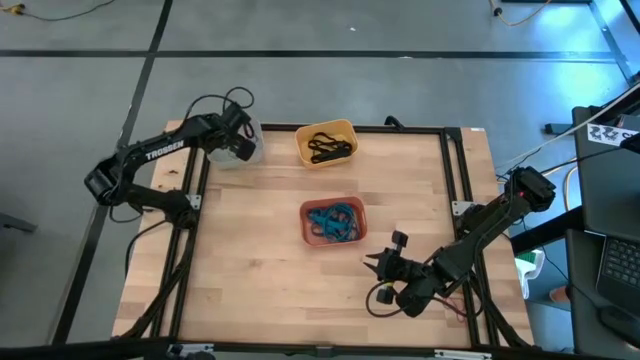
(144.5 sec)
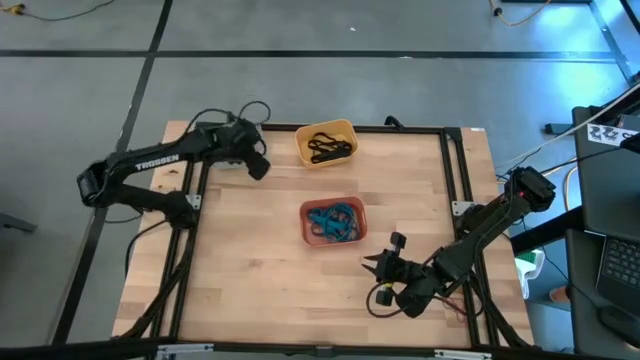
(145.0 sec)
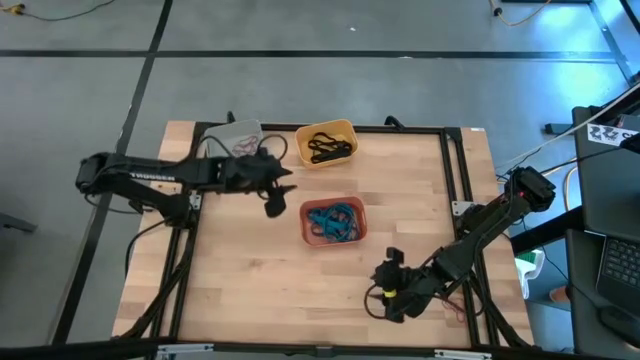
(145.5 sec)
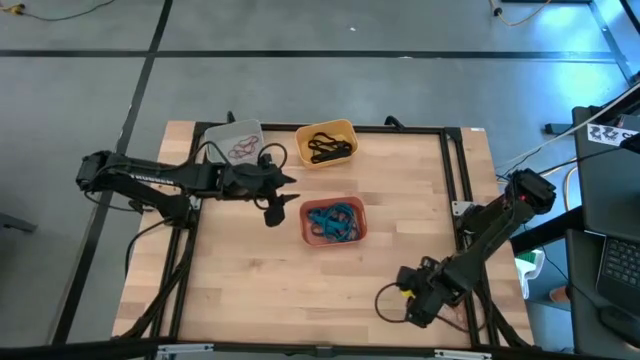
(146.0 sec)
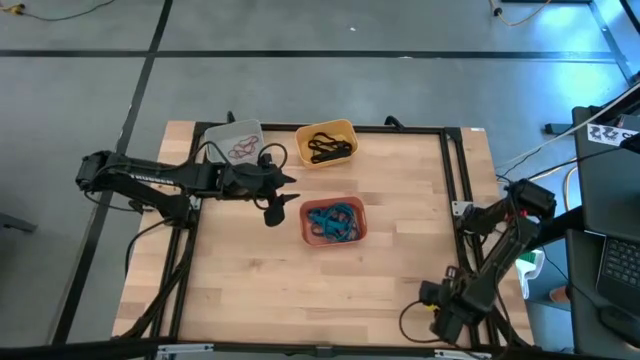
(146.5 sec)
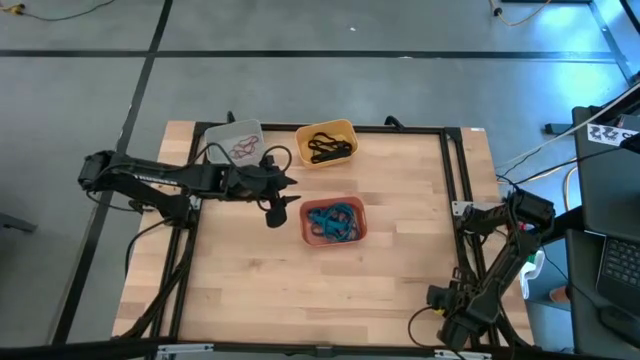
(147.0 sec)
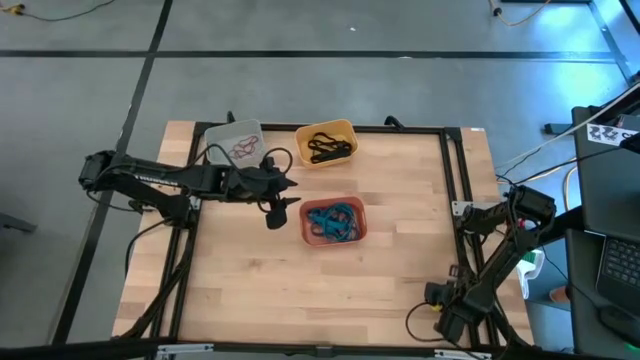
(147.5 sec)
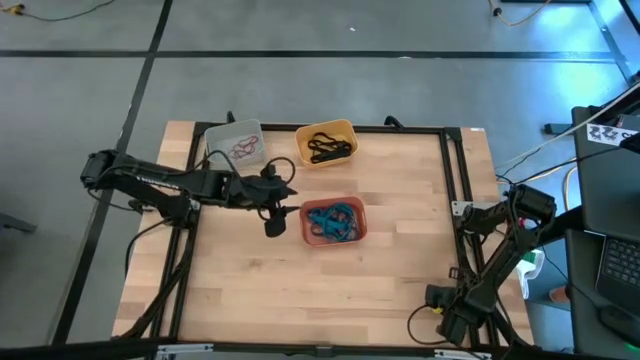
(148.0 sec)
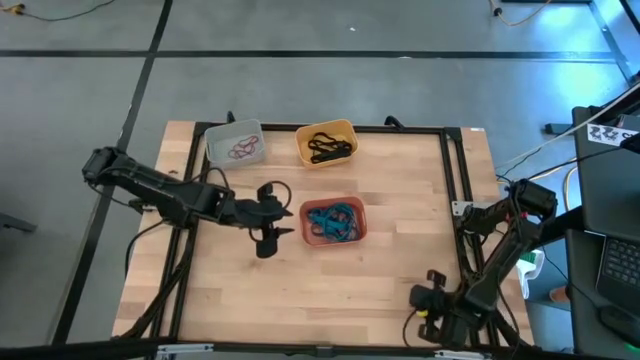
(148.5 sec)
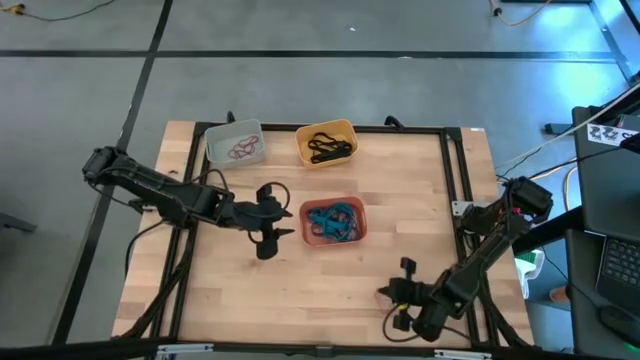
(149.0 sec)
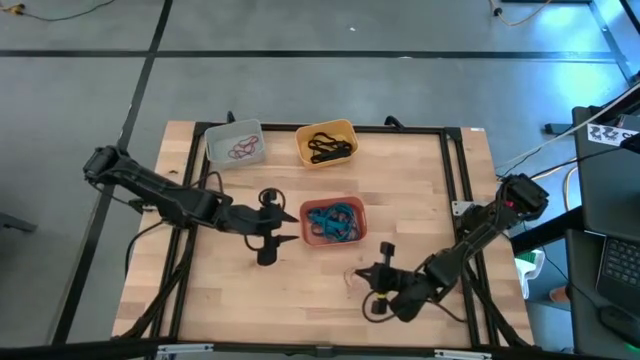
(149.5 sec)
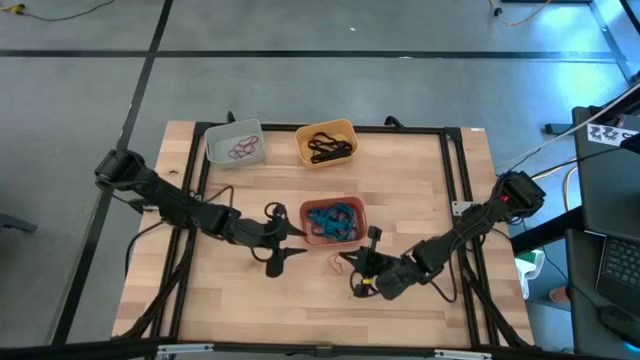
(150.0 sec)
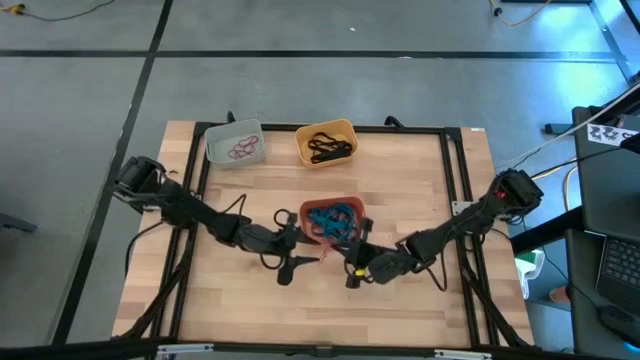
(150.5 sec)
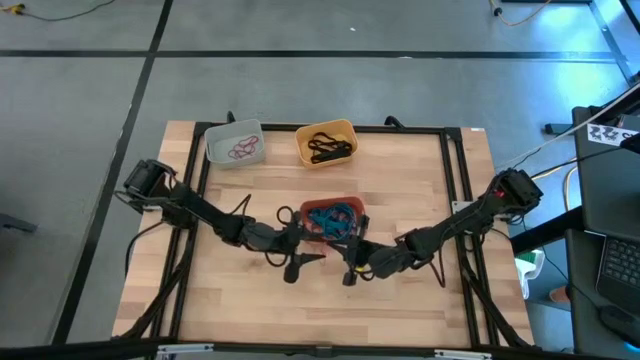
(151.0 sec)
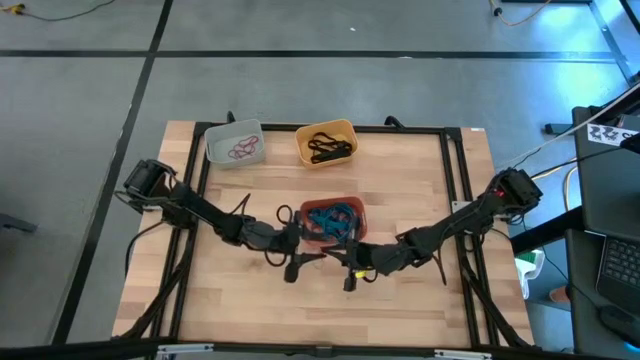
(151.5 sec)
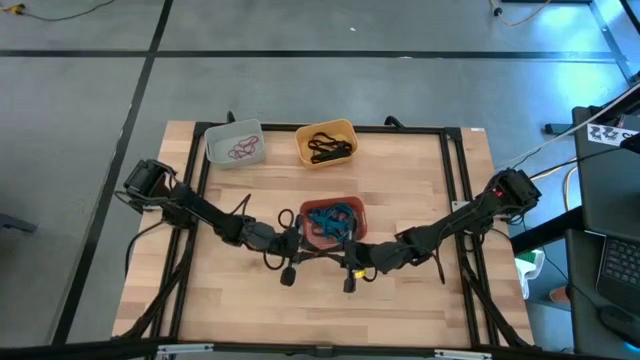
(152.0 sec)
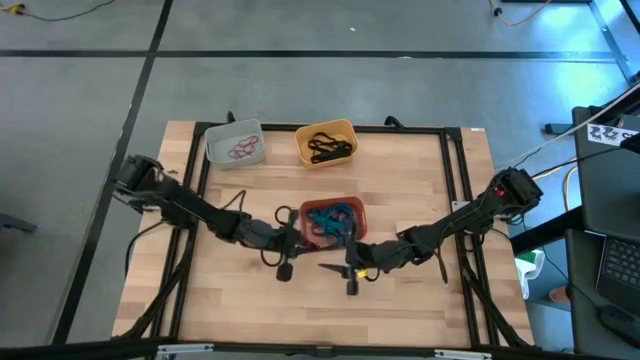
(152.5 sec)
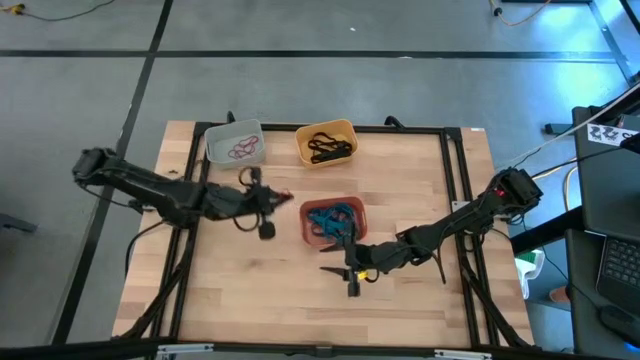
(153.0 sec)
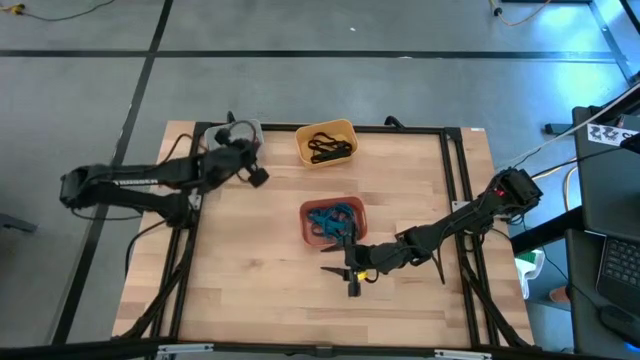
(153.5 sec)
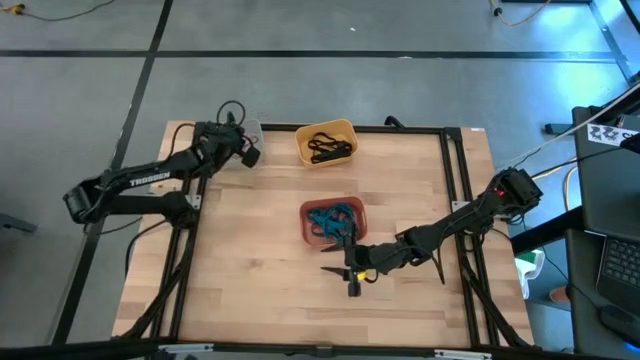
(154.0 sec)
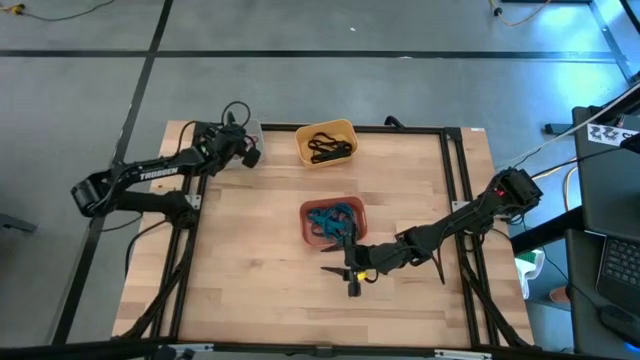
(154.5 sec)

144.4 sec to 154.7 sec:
Task: Sort rubber bands into baskets
Put the red rubber band into the gray bin

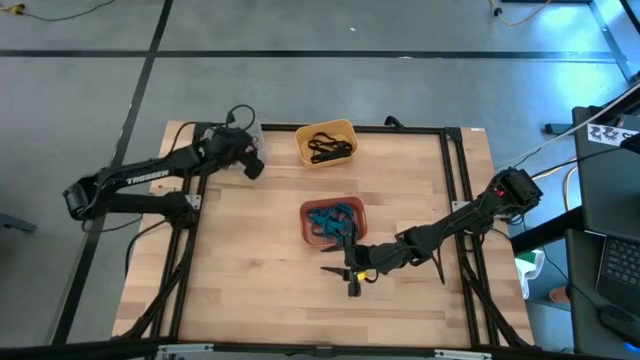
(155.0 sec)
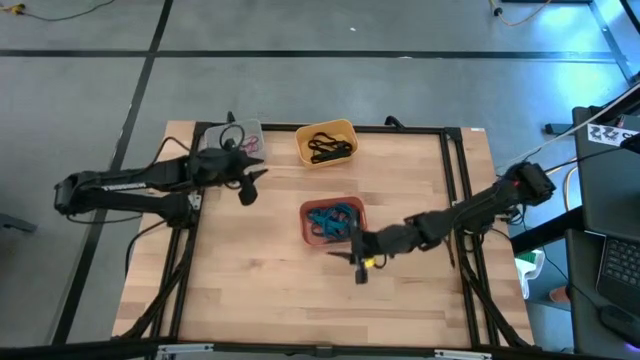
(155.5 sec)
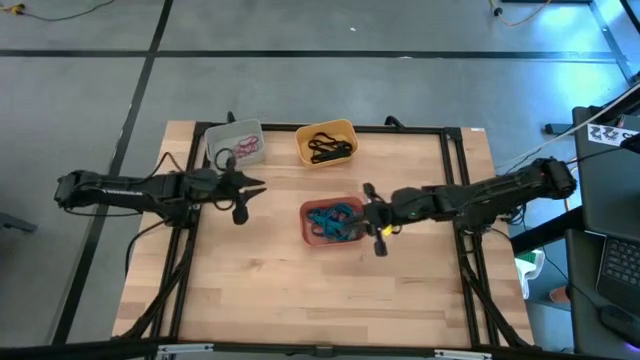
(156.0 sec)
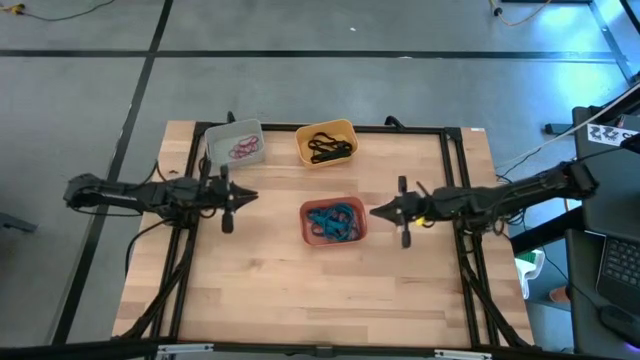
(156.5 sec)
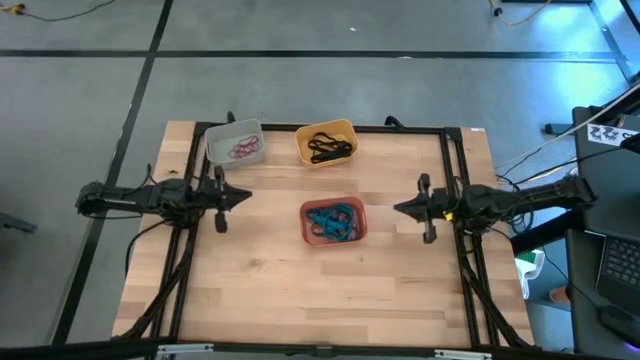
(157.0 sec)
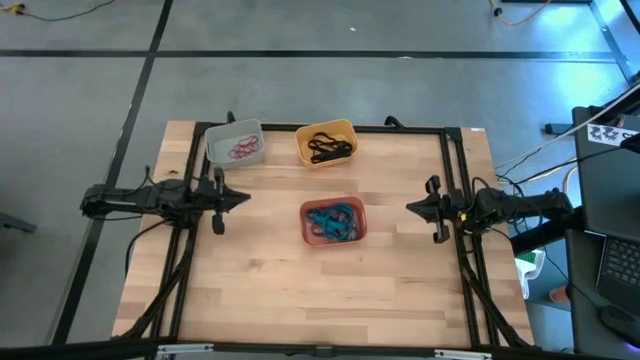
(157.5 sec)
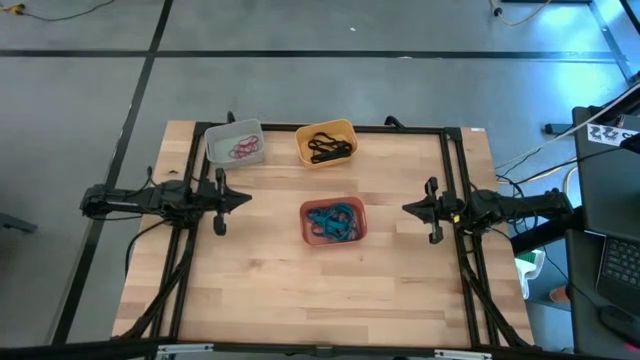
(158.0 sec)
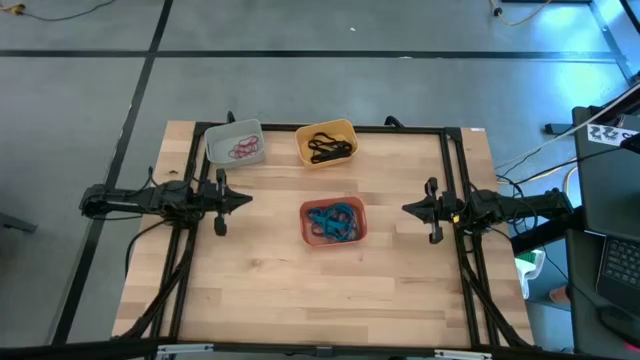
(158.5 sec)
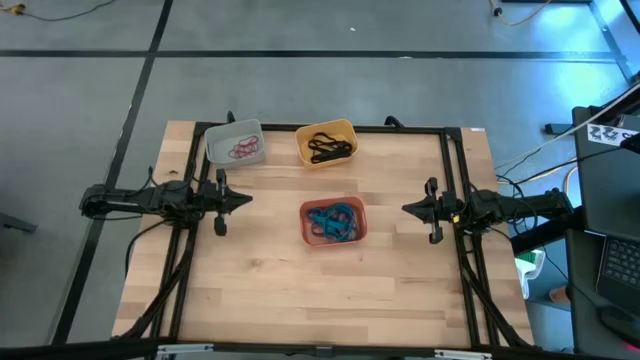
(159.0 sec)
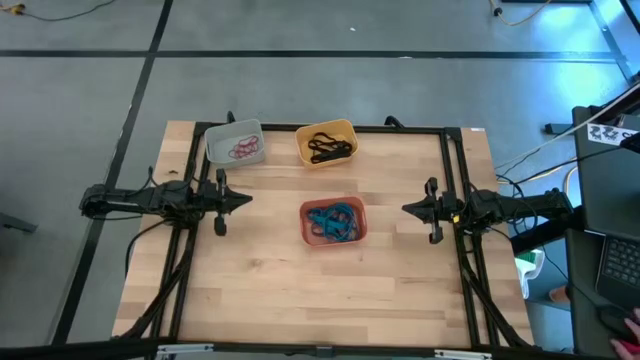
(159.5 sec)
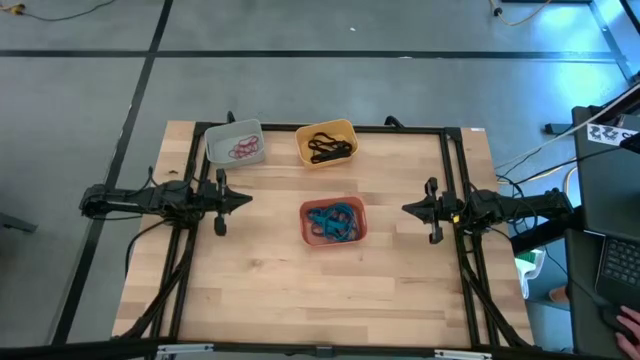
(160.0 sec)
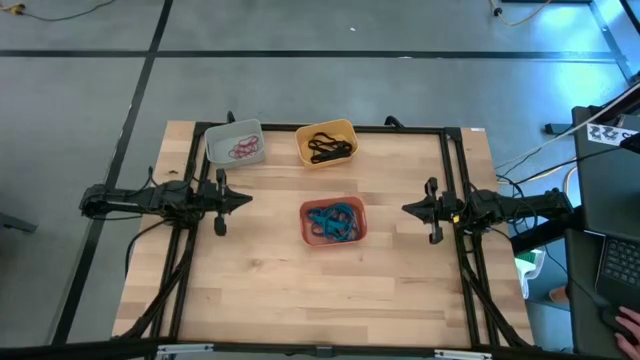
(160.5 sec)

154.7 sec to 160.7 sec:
Return to Home Position

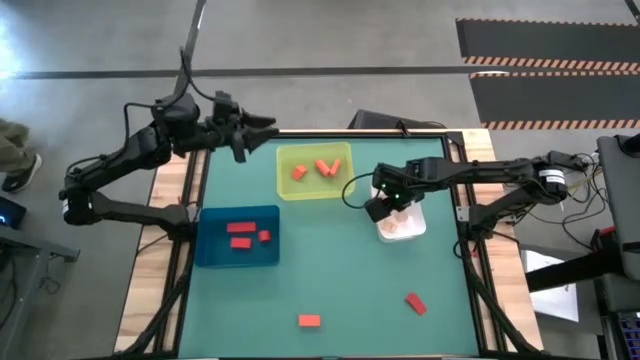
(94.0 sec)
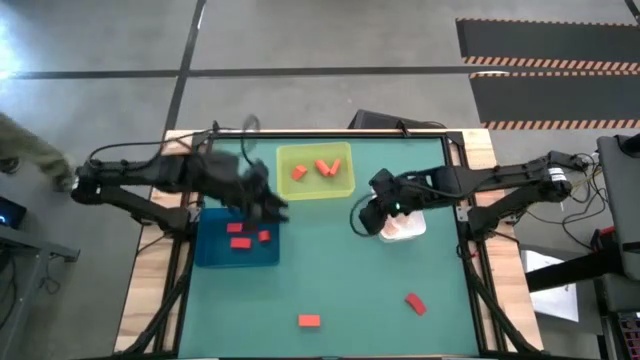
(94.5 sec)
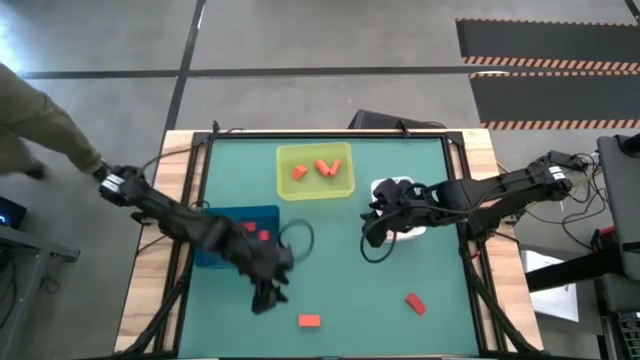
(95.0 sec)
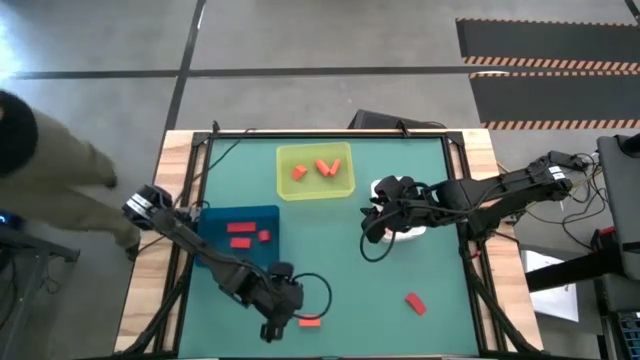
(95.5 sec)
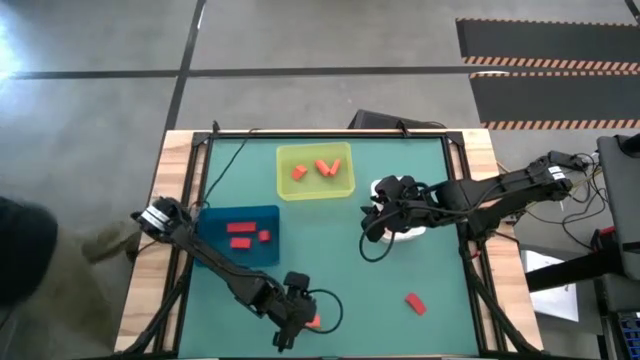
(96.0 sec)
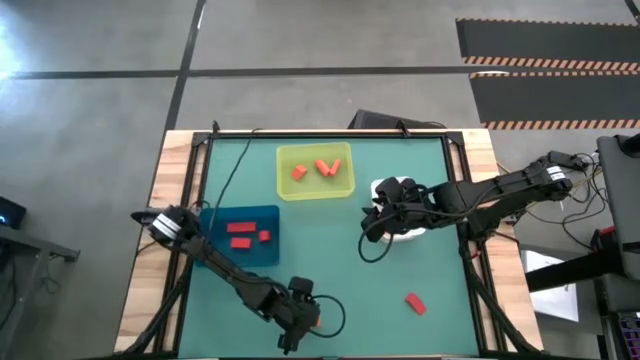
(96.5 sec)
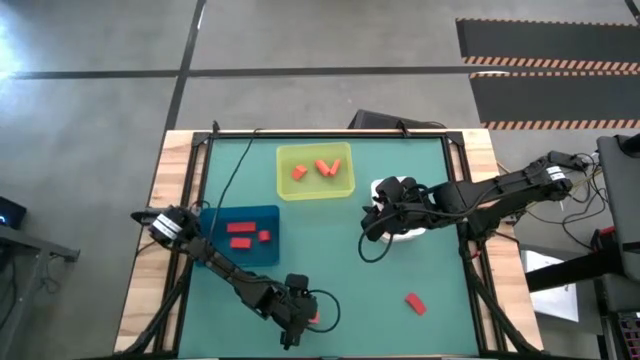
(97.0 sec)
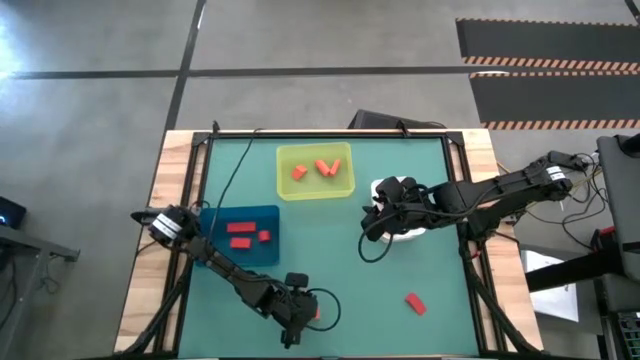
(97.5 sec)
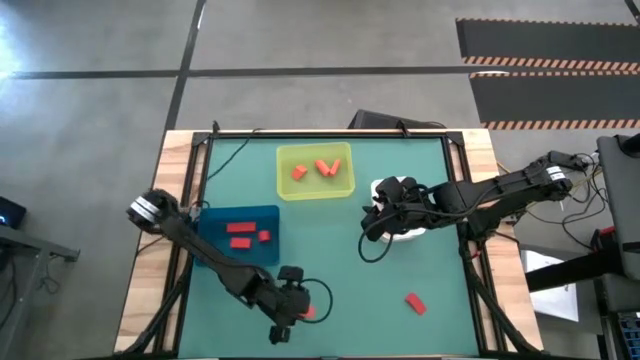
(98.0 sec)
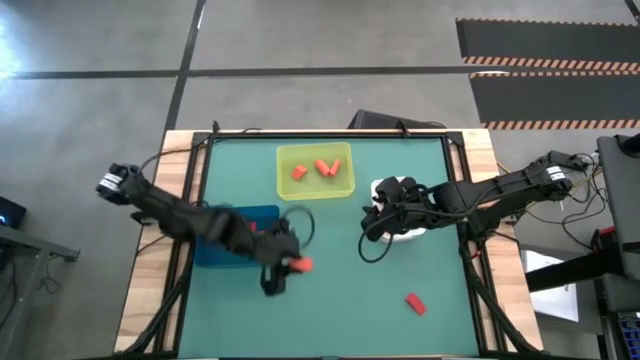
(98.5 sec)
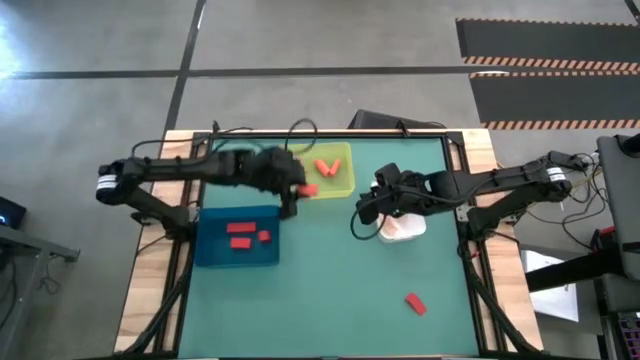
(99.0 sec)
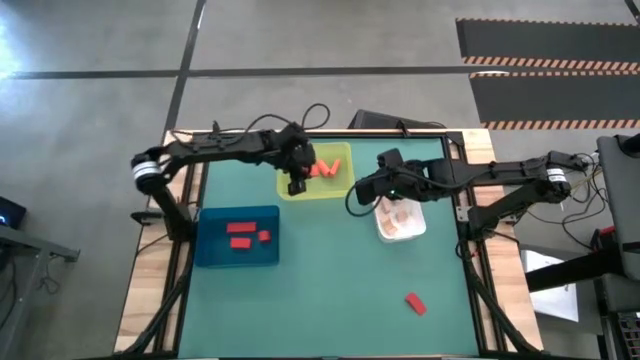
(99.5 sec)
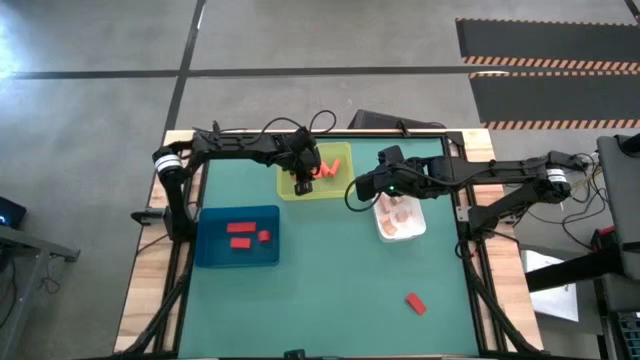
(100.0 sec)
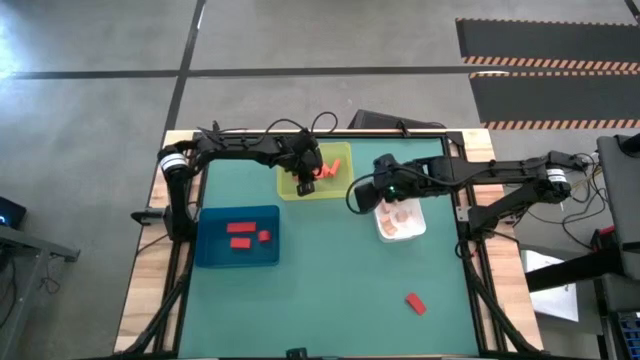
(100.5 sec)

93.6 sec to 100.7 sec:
Task: Sort & place blocks by color
Put the orange block into the yellow bin
